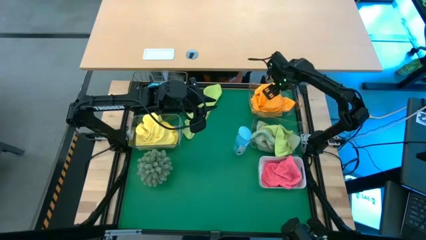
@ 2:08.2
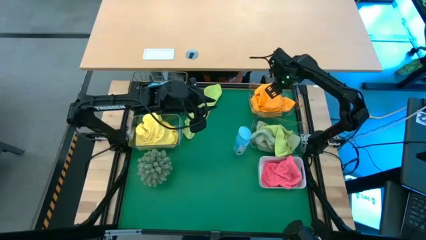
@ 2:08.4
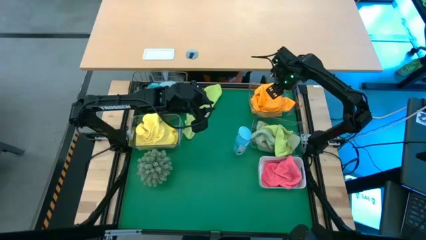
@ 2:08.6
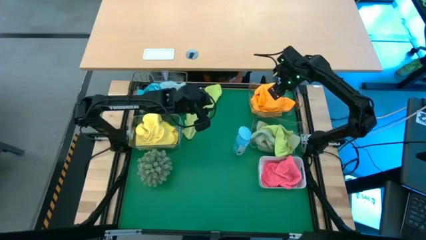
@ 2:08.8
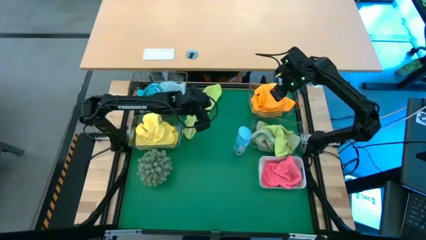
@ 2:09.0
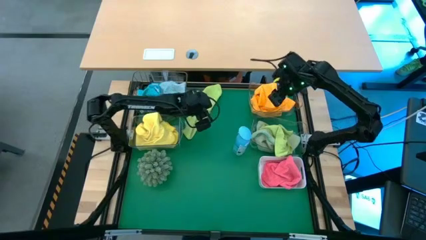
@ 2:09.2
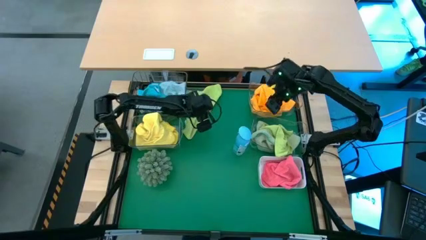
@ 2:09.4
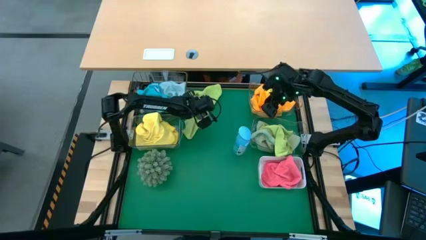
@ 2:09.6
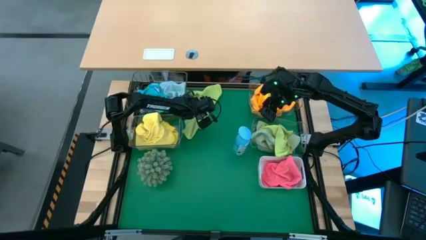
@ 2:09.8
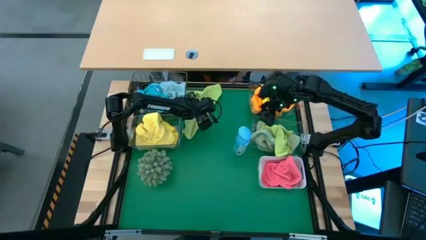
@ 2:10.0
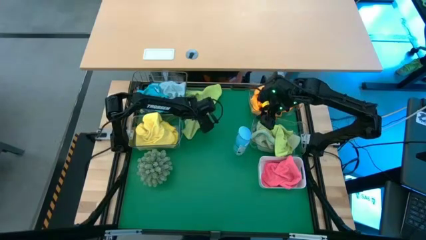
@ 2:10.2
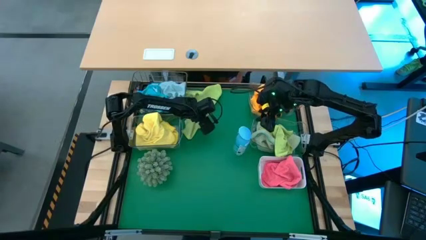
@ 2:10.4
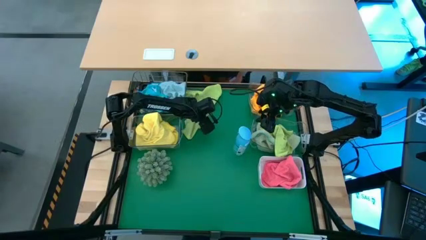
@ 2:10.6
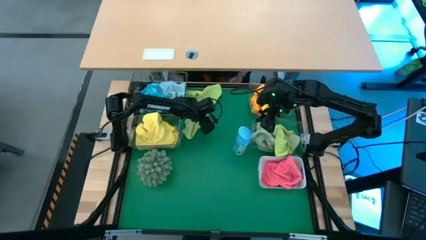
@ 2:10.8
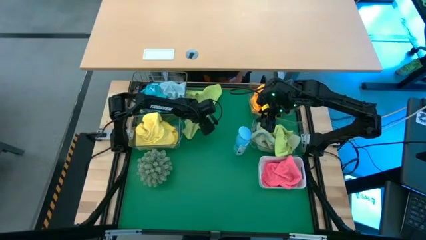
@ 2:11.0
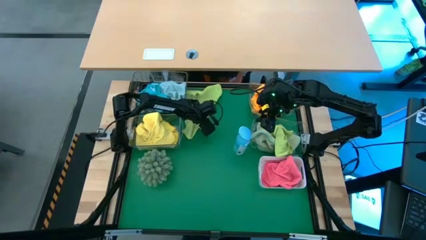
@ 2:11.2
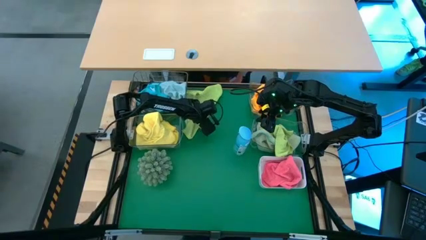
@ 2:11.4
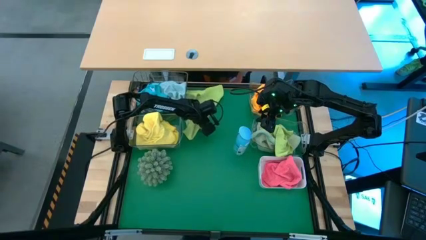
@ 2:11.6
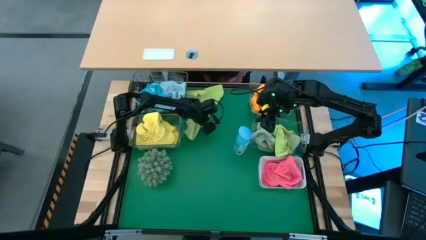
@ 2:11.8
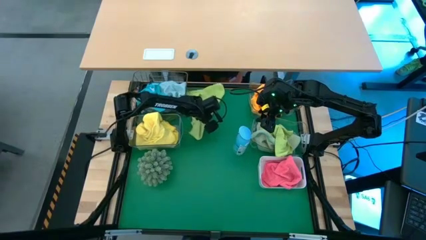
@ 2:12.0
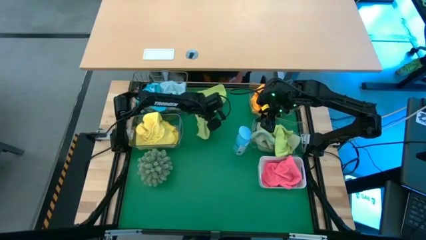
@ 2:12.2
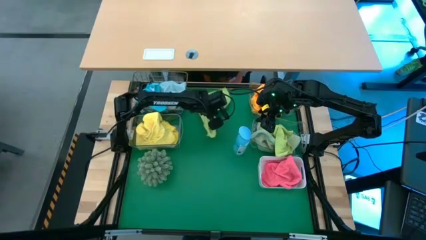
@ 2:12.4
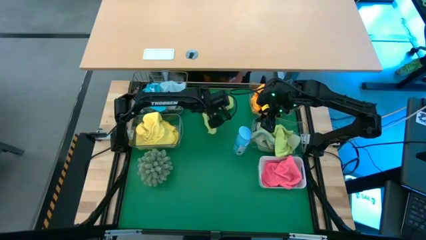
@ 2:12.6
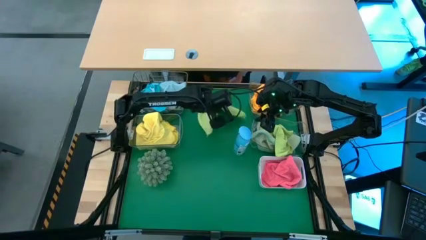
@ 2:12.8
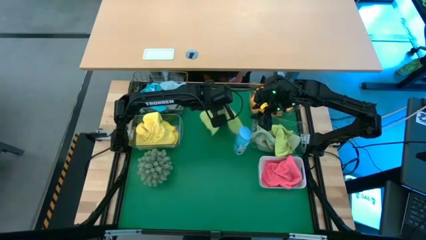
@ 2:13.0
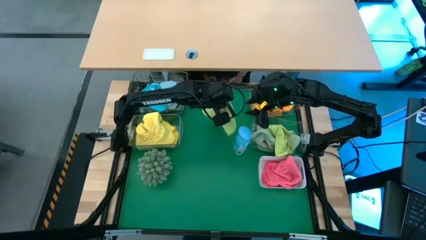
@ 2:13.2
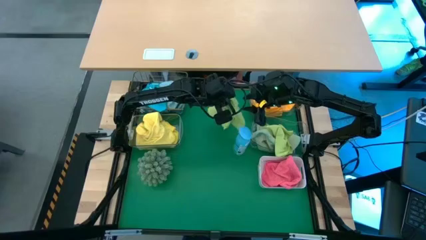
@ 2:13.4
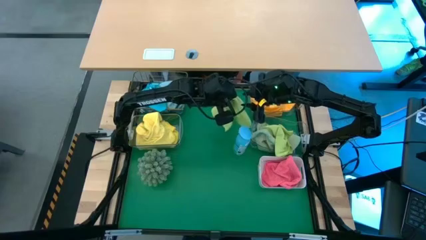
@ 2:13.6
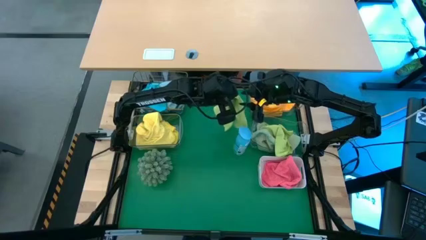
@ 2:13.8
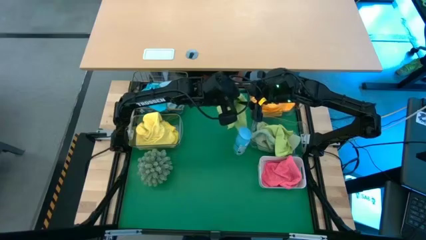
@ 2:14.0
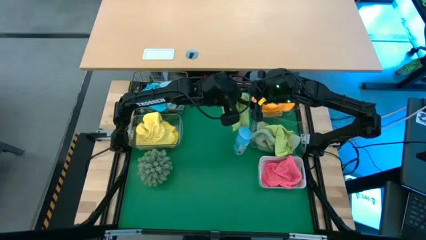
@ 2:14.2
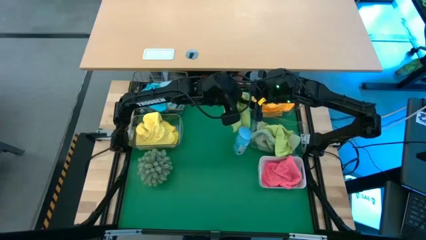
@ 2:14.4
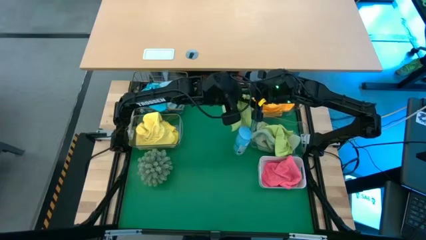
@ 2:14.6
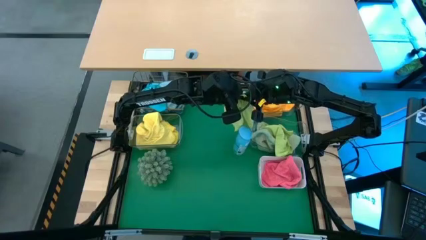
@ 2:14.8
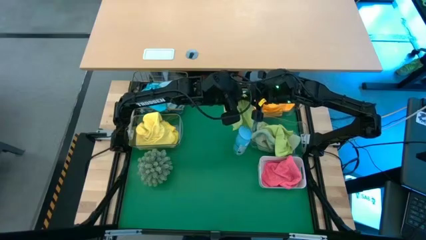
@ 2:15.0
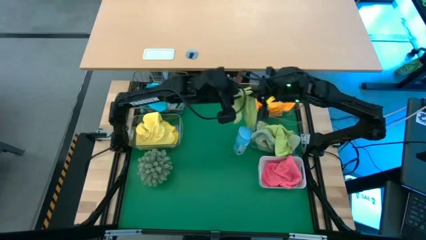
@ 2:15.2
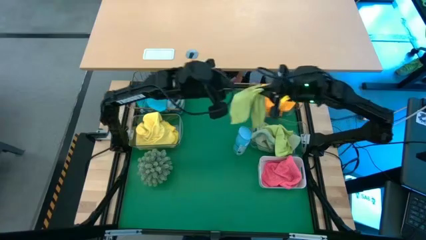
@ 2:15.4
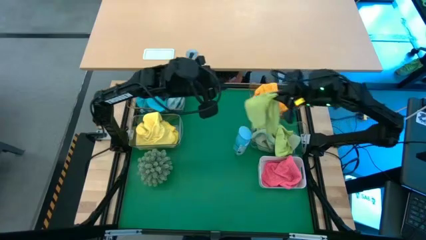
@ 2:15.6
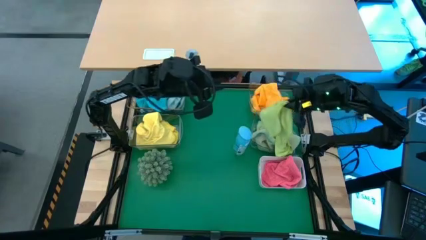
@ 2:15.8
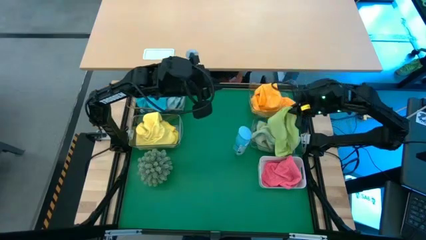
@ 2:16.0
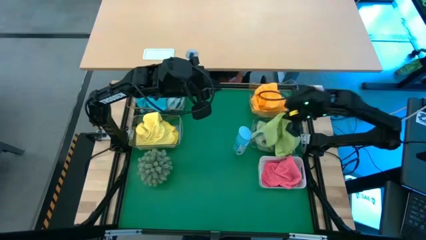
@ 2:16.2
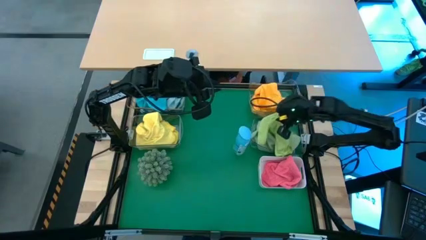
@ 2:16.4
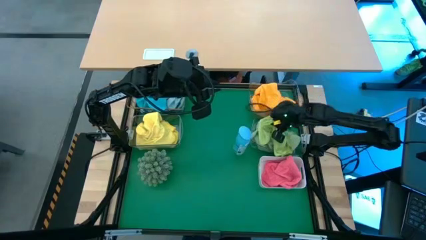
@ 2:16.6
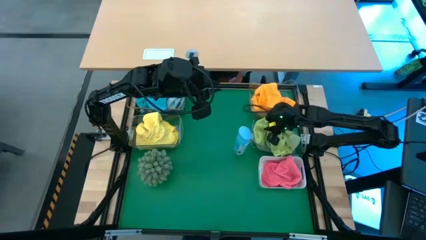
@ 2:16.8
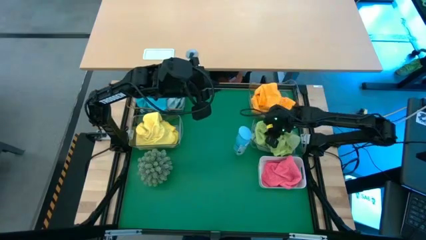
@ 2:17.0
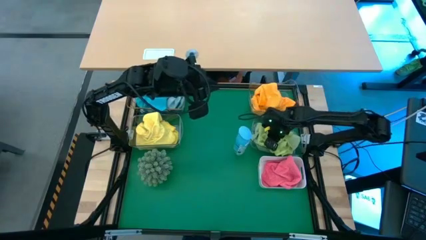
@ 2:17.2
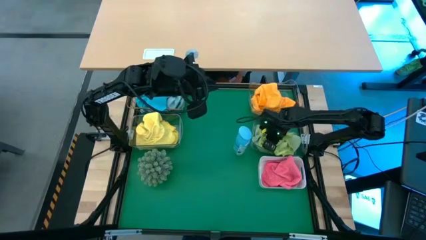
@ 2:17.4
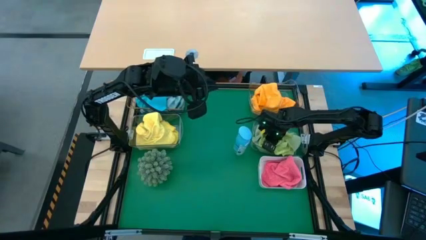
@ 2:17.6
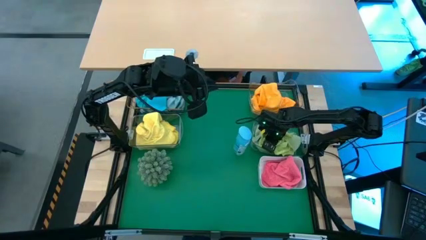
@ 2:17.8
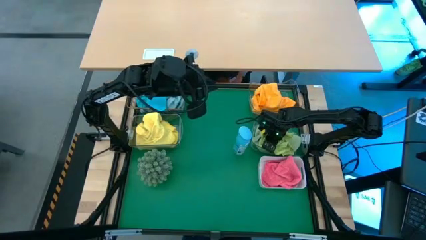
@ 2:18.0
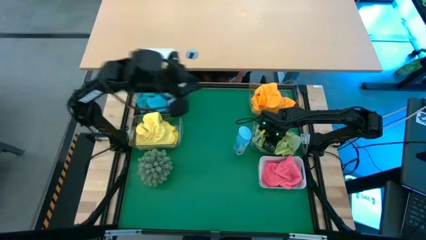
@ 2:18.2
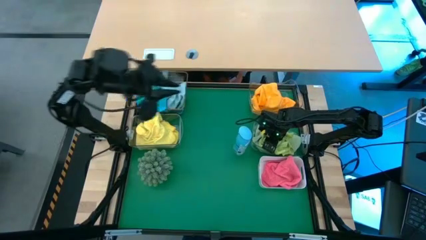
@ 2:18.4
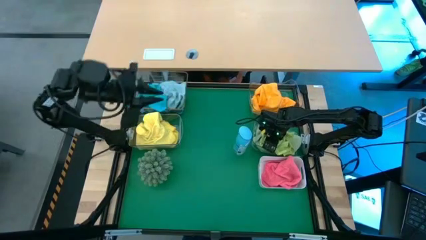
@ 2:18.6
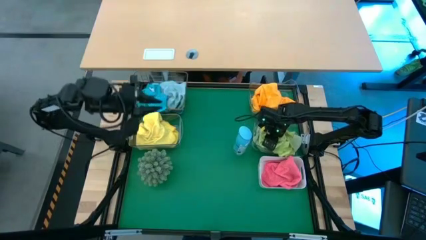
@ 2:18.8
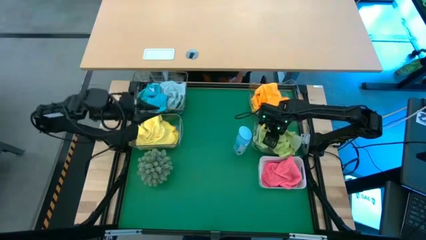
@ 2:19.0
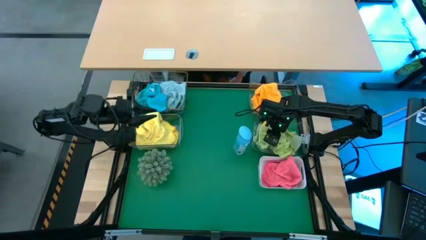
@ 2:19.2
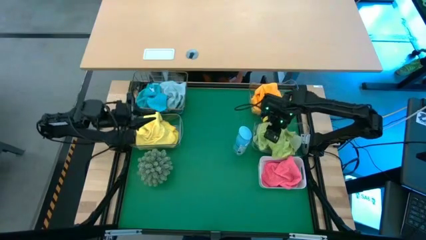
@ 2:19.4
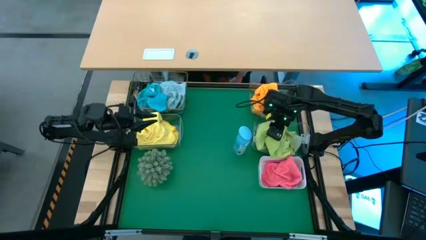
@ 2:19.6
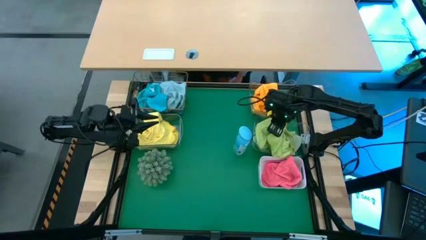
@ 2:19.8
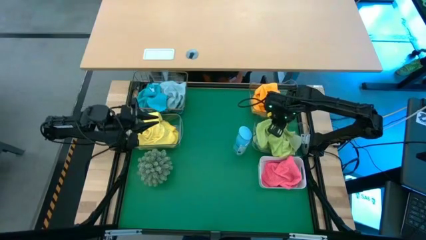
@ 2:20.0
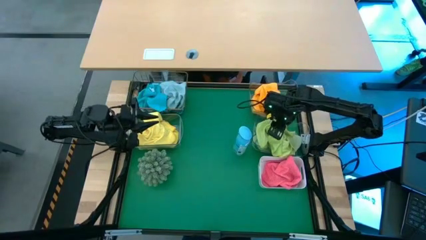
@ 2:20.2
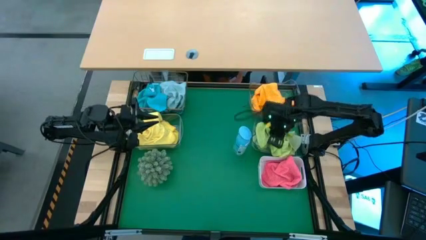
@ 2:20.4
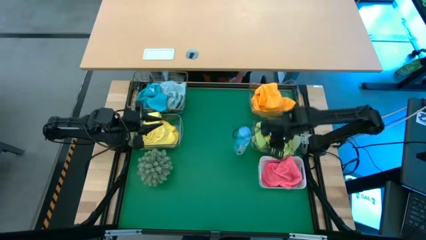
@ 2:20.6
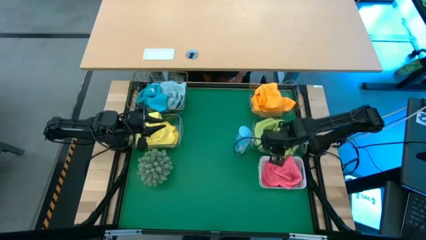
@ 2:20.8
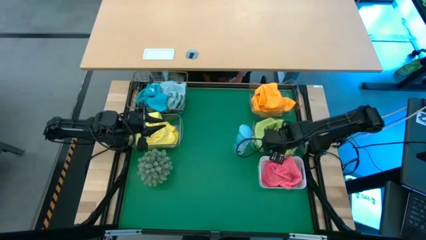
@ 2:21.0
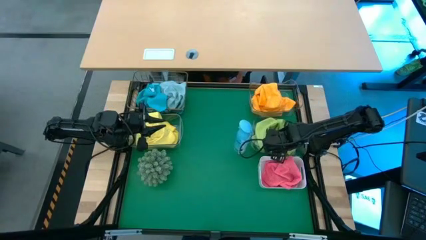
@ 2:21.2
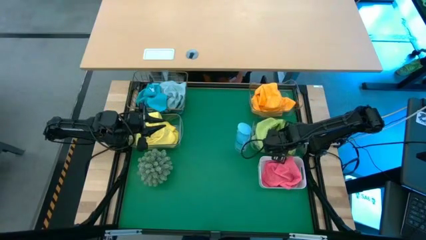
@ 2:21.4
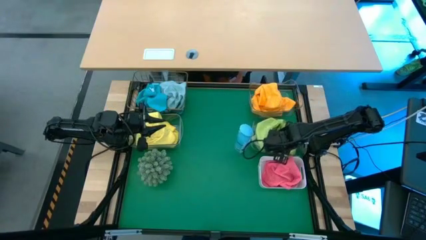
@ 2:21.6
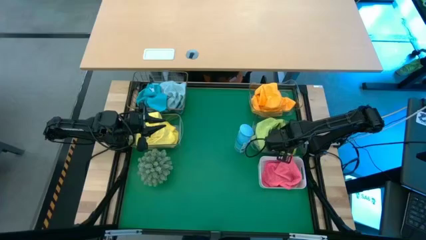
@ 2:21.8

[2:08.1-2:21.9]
Task: Sort microfiber towel by color & place in baskets
Put the light green microfiber towel into the bottom right transparent bin
